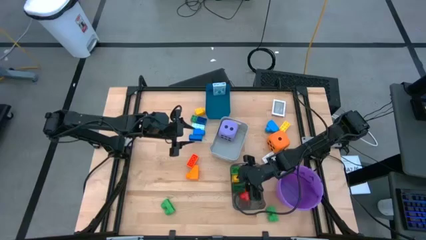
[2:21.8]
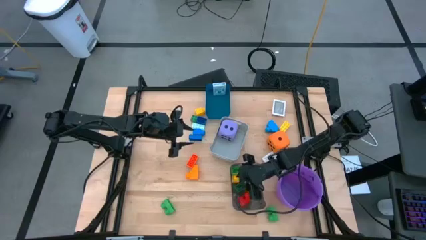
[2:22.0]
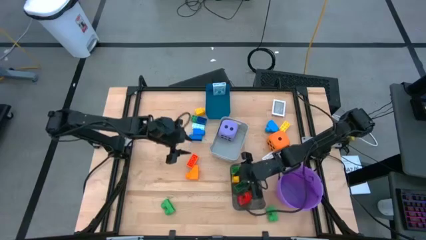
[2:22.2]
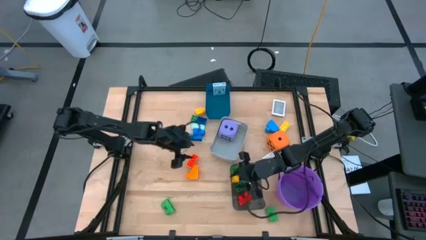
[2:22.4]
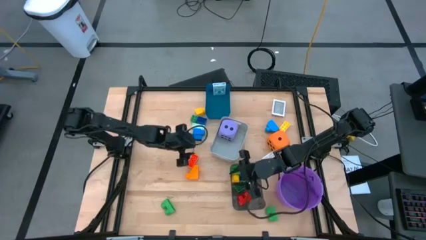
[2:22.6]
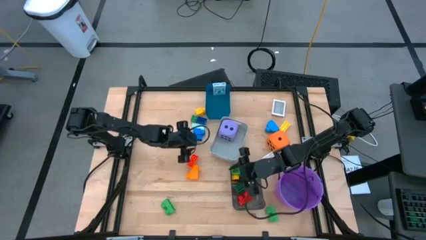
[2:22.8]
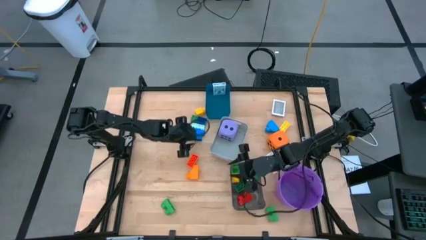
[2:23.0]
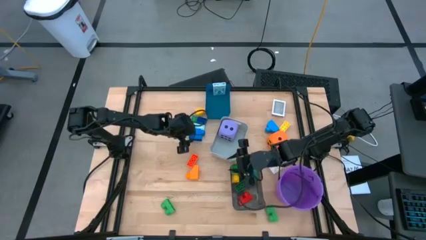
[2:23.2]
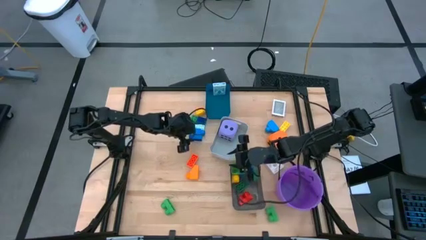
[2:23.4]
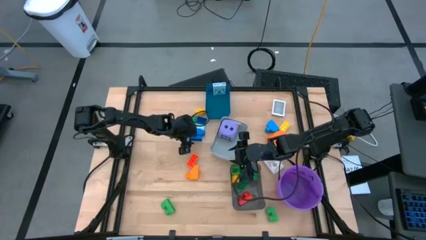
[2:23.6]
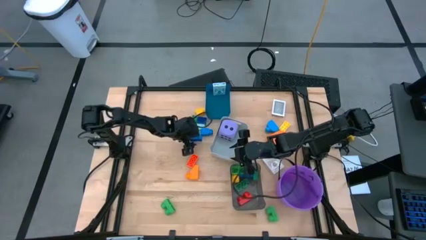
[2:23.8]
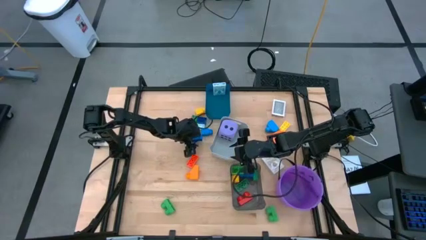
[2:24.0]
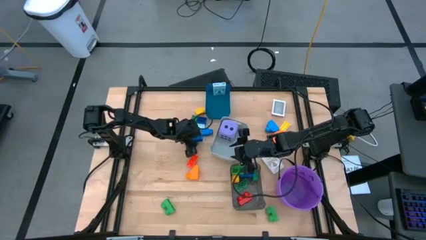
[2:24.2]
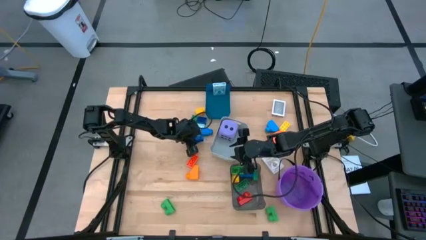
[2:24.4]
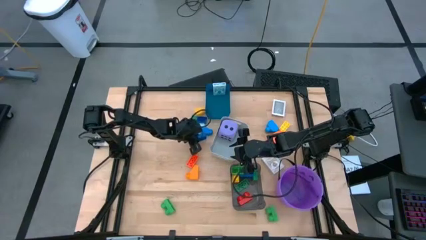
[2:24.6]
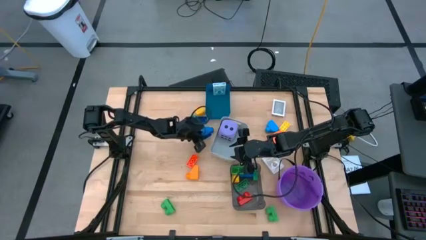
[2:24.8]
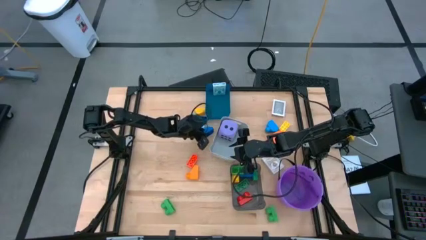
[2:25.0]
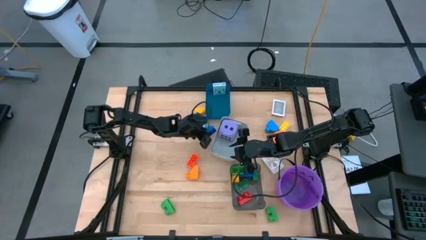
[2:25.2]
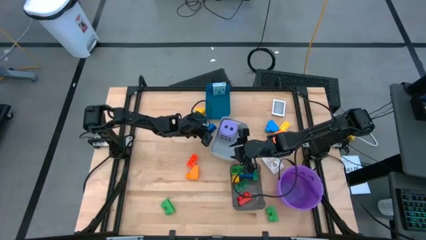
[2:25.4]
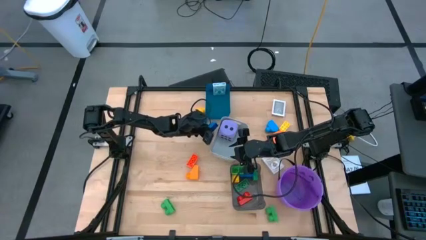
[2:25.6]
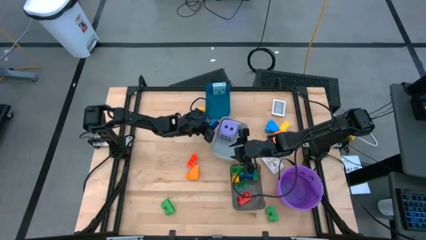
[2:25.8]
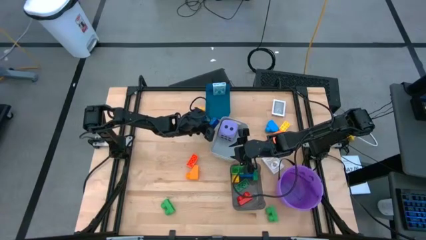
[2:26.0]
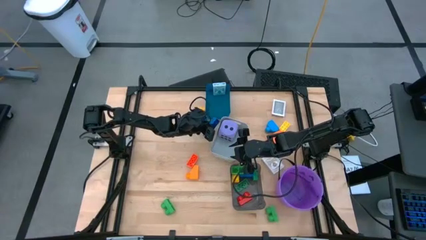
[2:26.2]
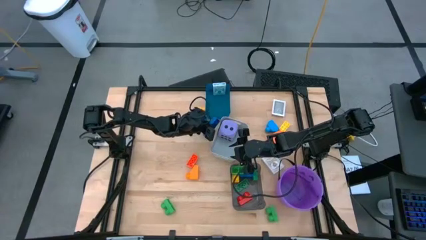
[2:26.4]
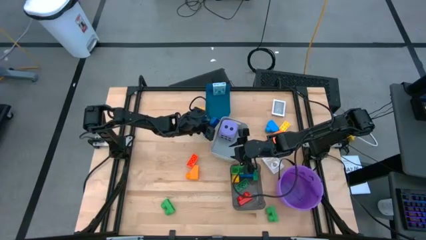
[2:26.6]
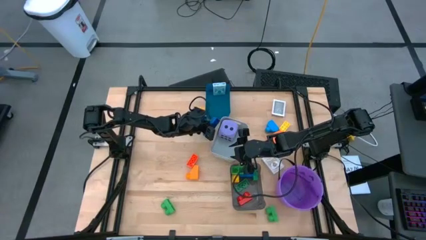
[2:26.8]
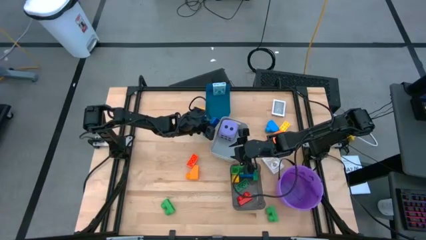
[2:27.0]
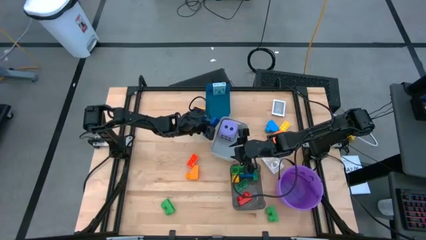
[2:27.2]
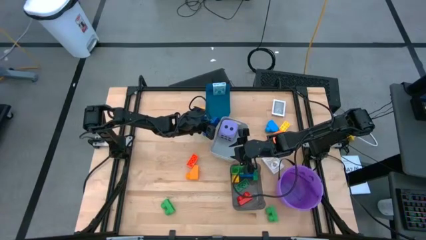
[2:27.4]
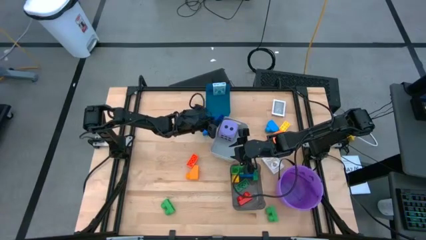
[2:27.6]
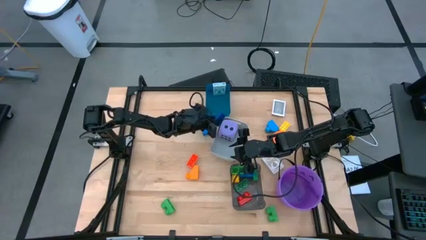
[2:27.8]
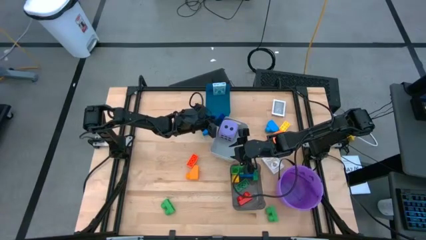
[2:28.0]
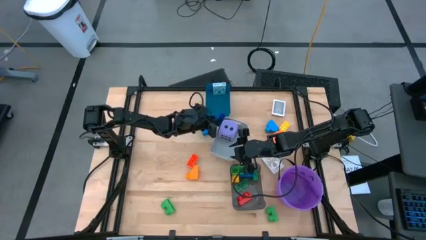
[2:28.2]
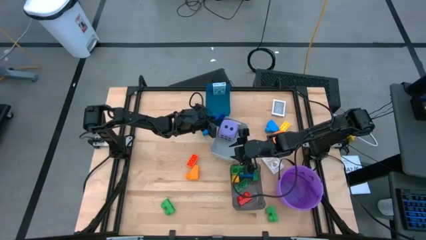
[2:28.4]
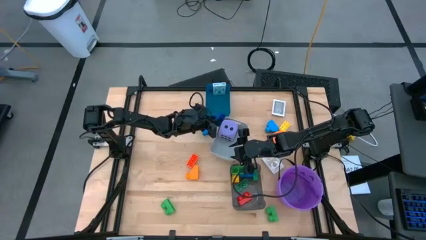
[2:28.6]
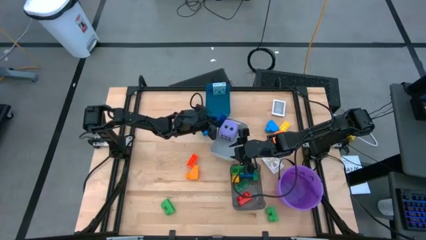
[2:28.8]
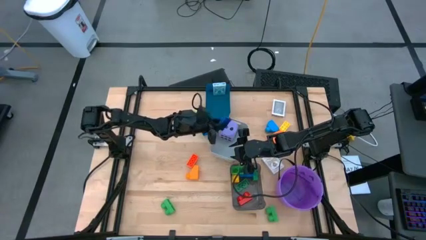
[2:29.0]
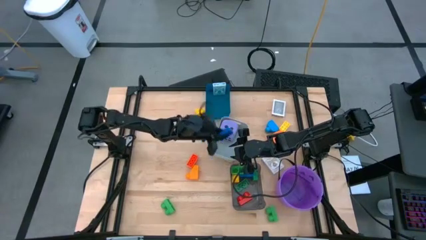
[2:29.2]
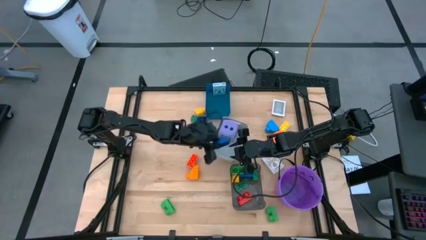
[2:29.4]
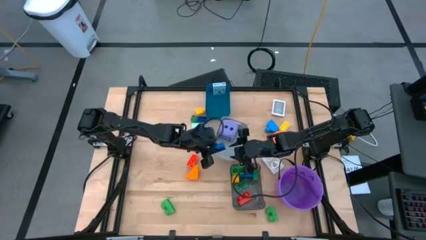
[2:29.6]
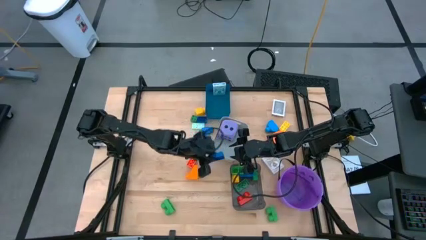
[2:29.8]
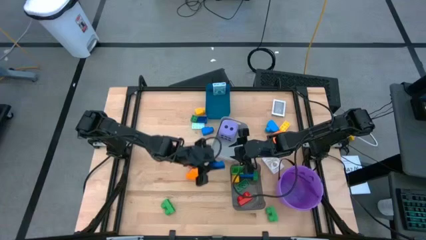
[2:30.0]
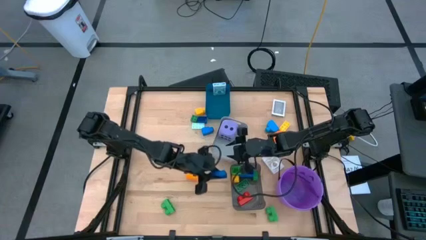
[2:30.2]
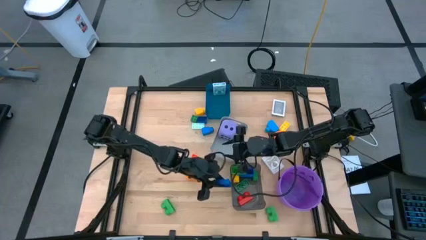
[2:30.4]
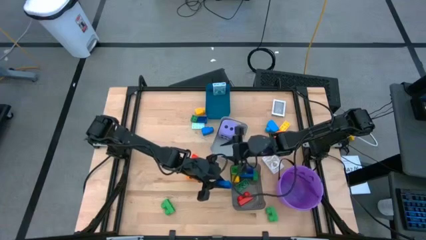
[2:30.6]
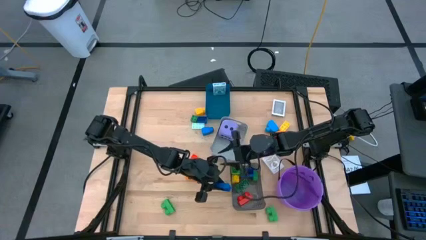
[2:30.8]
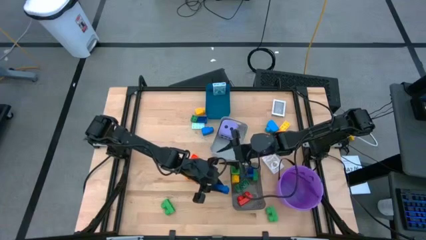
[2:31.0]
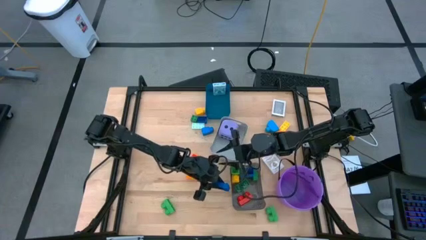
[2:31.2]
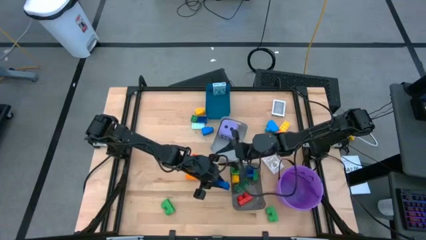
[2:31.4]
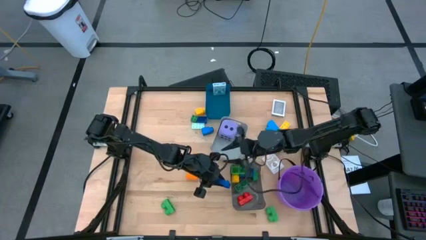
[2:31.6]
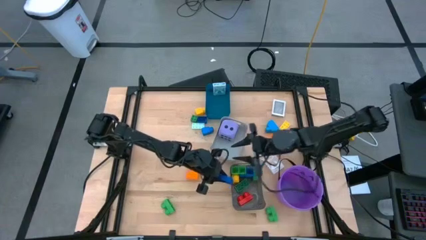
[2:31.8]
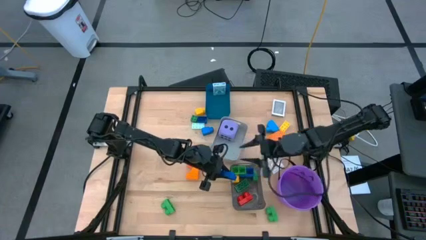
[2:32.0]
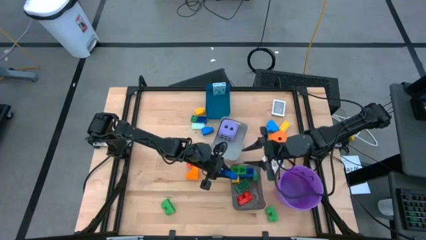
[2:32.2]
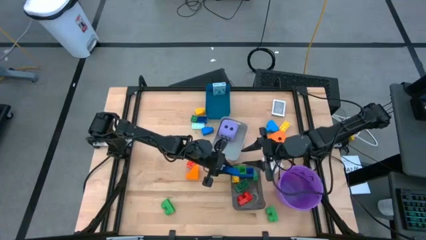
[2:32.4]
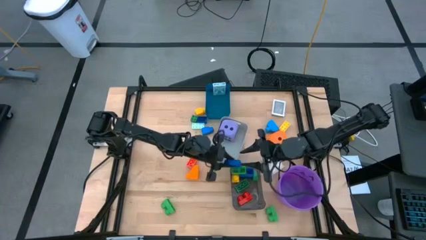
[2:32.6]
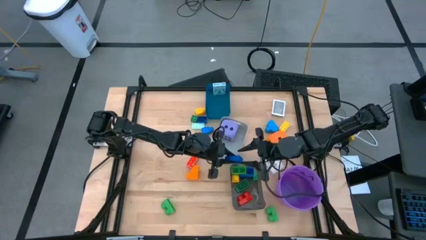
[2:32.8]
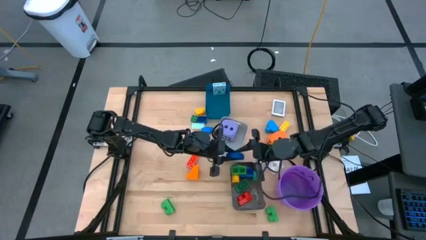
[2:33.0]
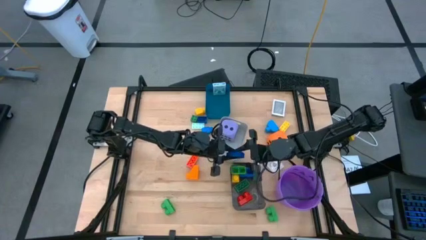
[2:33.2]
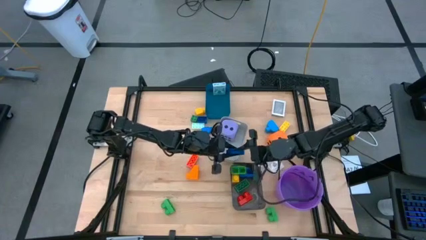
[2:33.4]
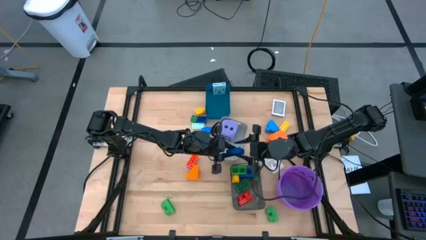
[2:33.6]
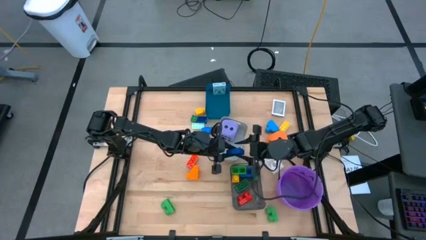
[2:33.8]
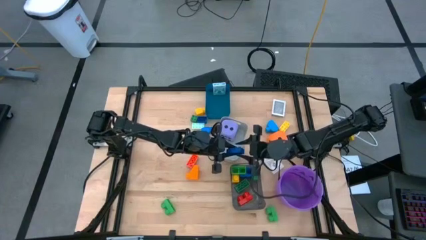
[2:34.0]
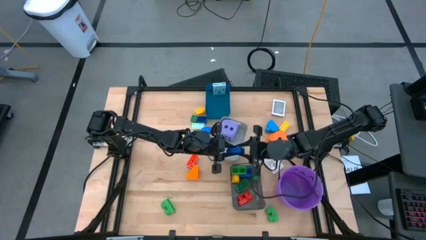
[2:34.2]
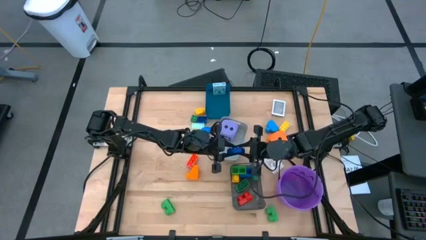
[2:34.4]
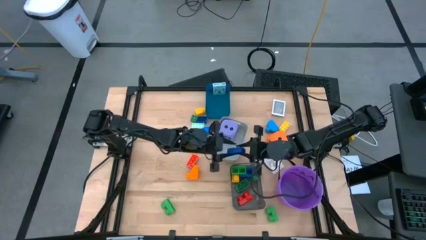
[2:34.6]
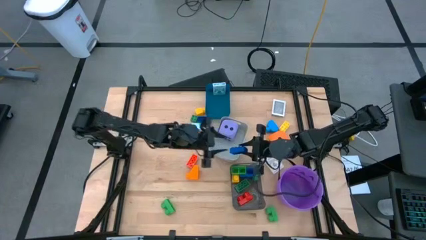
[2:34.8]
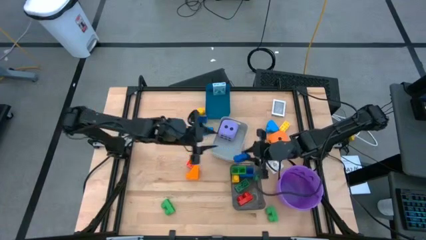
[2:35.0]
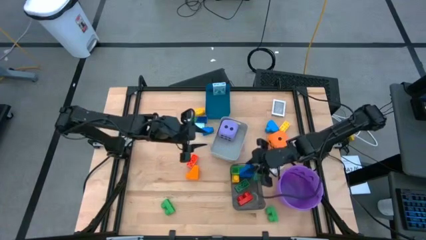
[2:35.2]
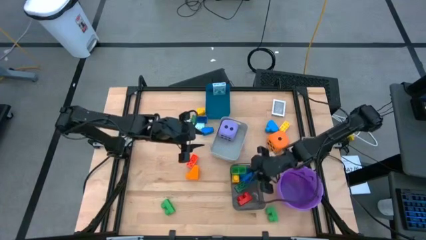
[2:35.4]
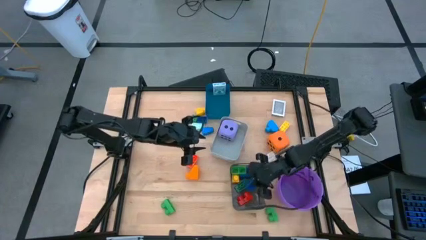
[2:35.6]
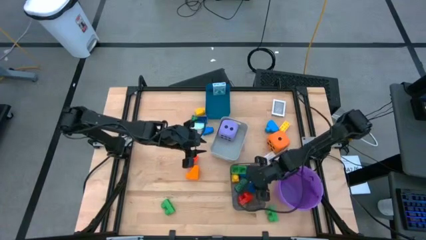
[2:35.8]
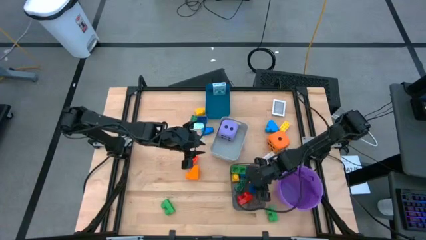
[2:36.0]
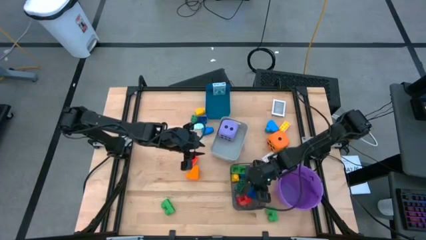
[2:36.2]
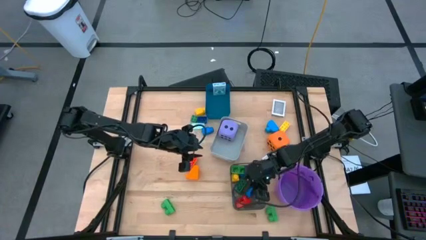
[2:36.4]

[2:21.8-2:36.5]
Task: Pick & Place Toys
Put the blue game piece into the black bin

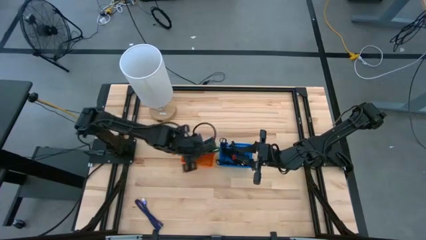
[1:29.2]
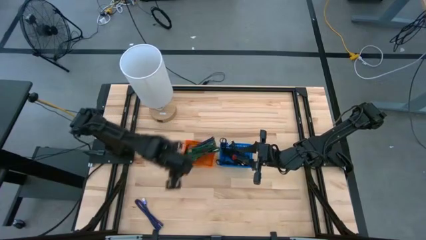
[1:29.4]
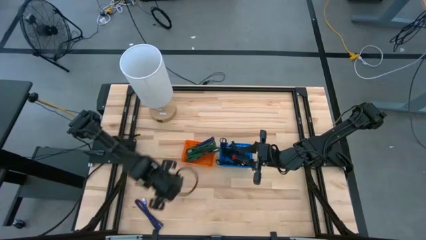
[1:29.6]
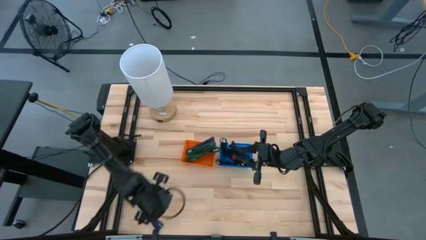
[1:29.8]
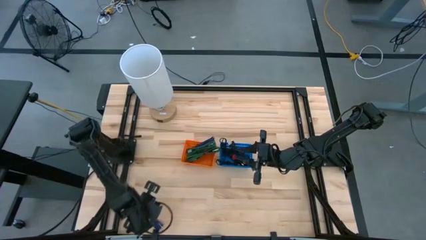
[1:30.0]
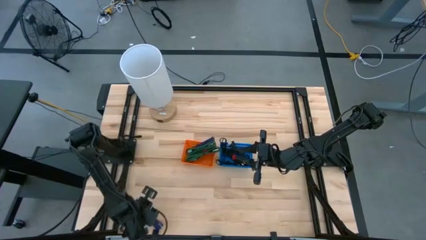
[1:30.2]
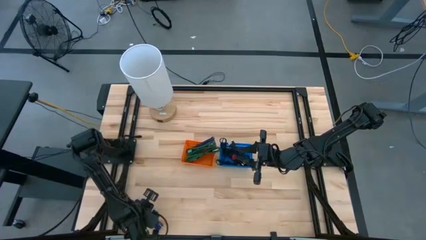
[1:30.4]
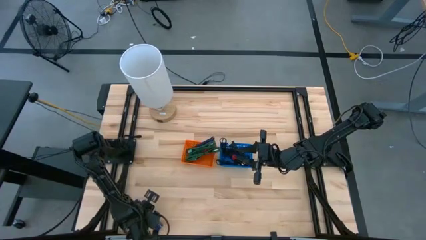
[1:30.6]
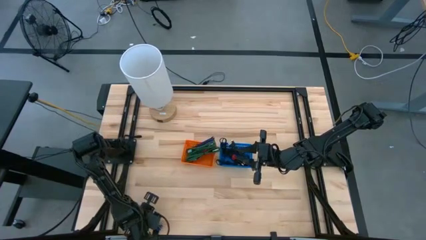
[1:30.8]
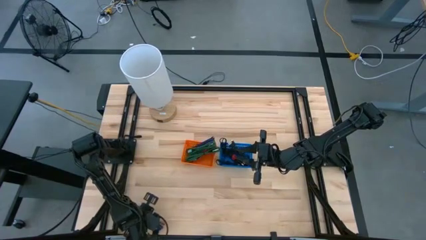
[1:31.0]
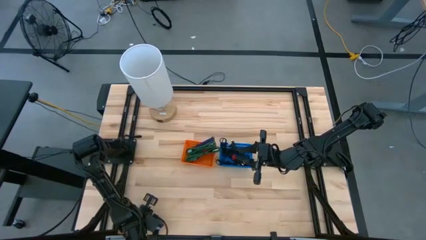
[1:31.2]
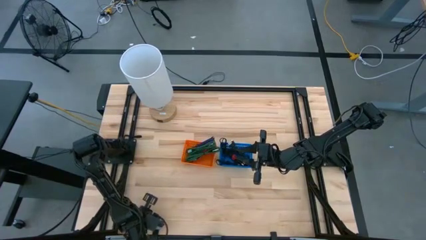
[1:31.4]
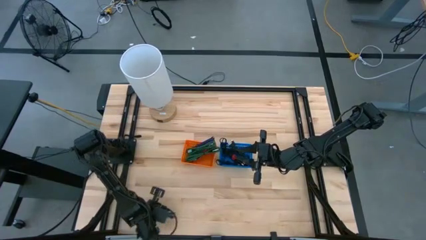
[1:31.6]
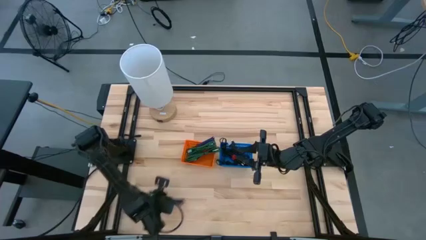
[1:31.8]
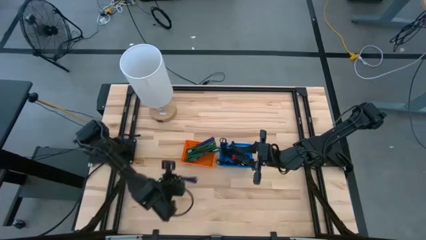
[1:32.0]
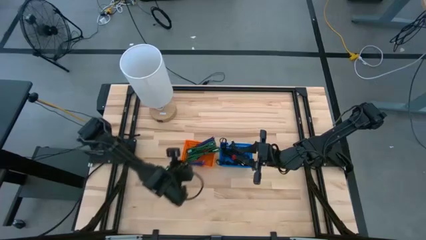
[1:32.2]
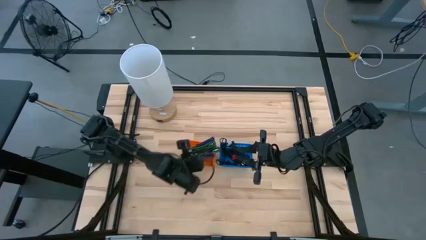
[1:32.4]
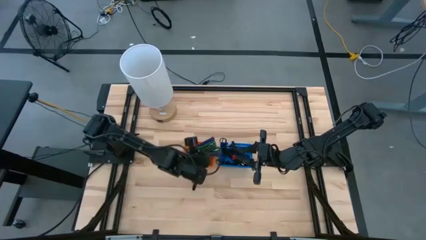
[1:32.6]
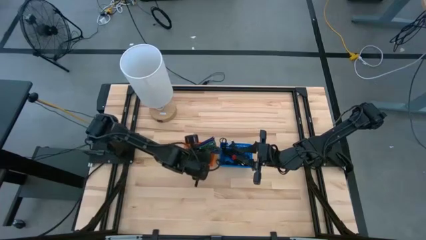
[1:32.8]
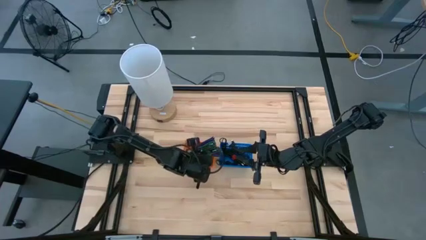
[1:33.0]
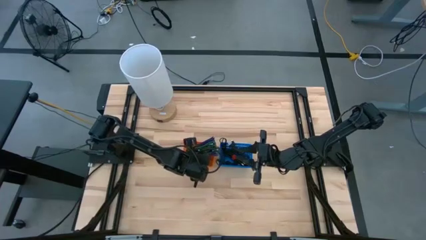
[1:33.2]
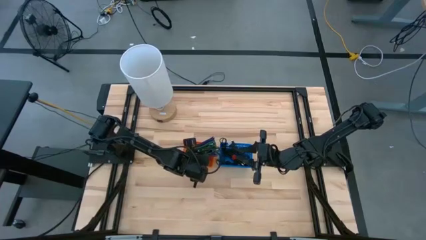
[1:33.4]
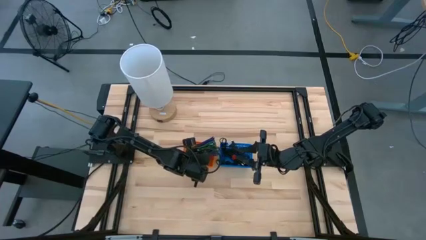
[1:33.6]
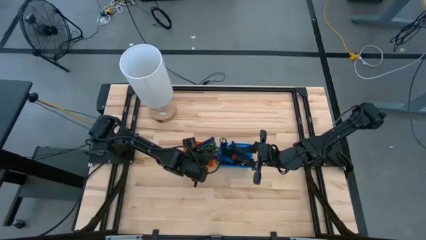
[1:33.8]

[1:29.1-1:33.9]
Task: Pick & Place USB Port
Put the violet charger cable into the orange bin
